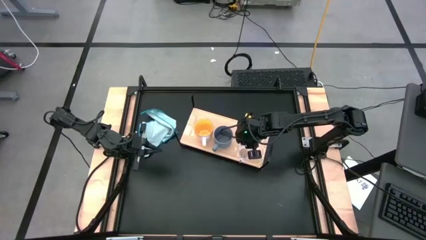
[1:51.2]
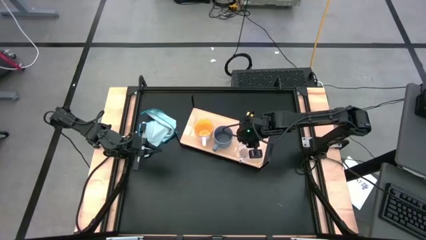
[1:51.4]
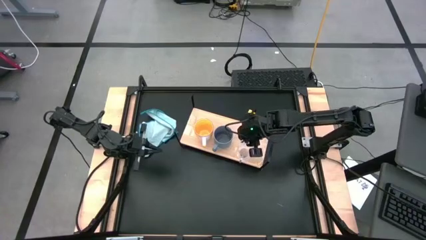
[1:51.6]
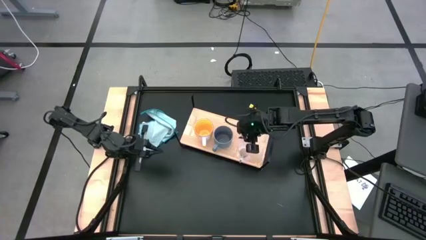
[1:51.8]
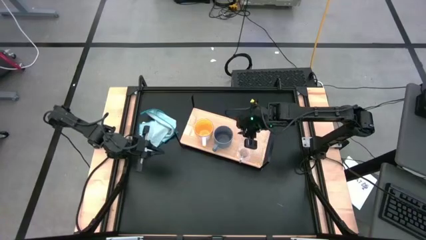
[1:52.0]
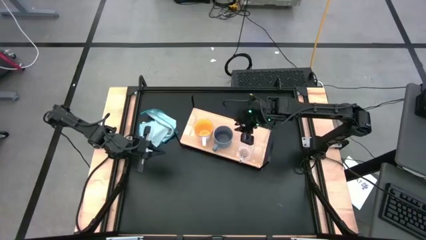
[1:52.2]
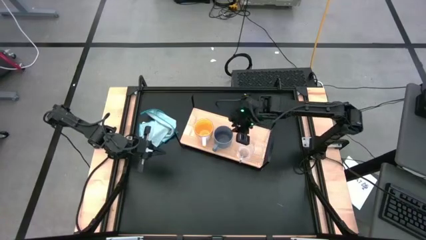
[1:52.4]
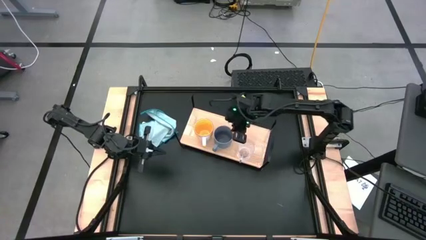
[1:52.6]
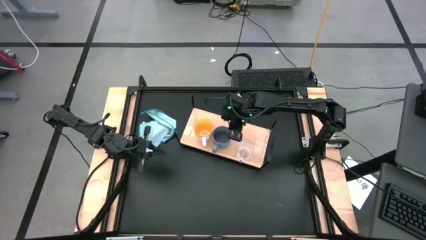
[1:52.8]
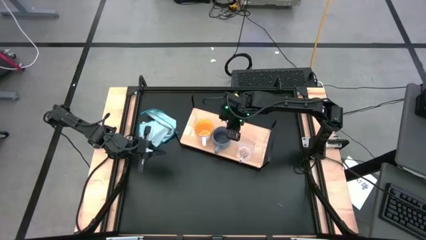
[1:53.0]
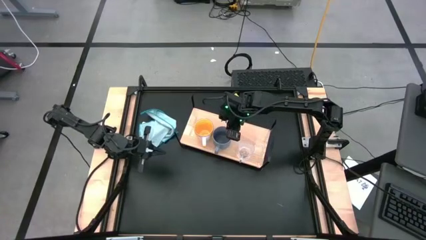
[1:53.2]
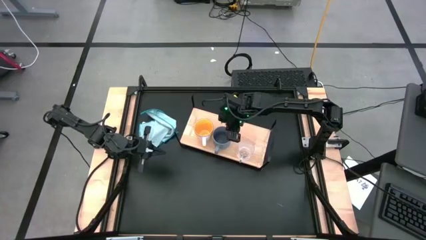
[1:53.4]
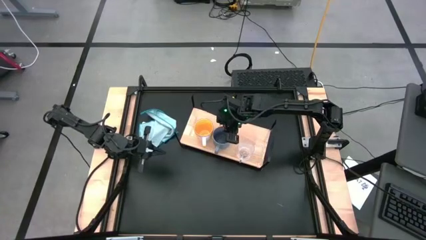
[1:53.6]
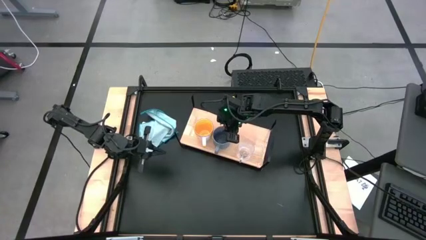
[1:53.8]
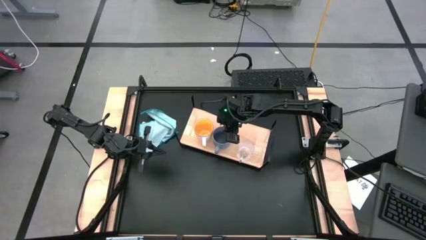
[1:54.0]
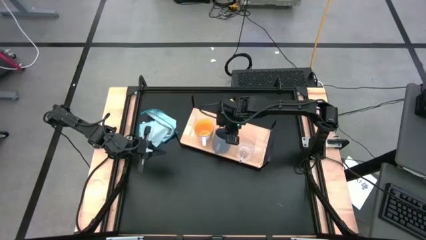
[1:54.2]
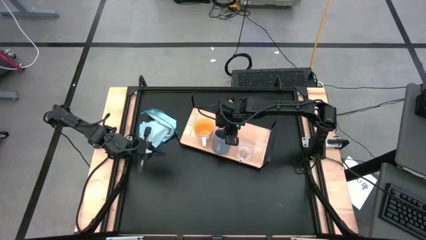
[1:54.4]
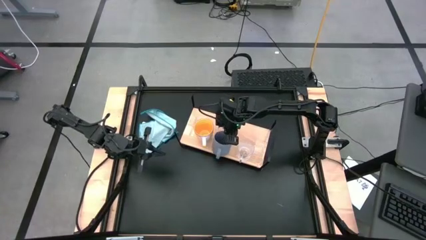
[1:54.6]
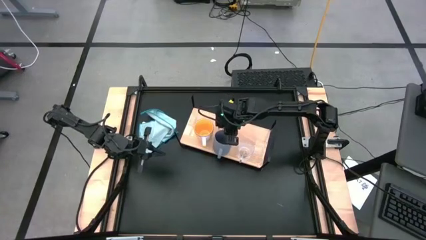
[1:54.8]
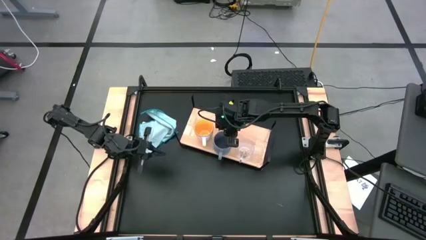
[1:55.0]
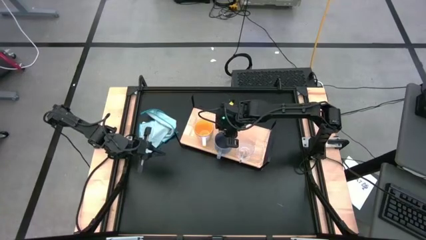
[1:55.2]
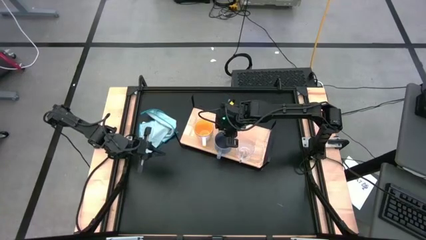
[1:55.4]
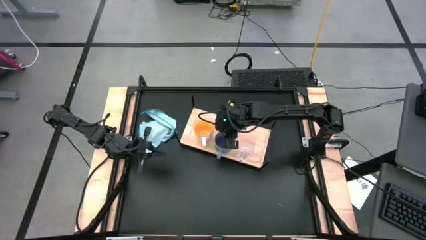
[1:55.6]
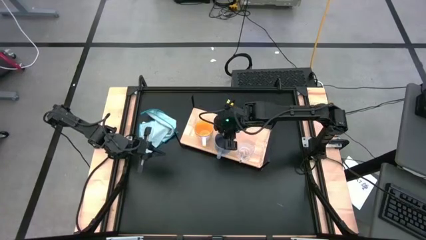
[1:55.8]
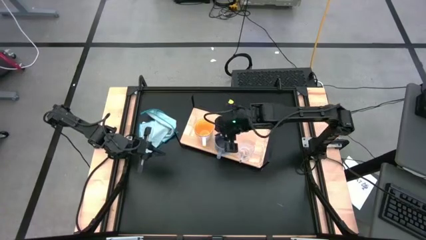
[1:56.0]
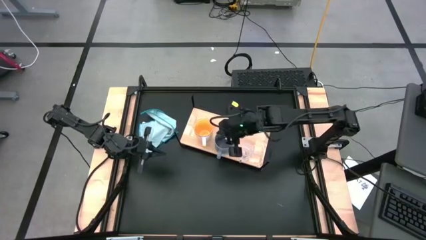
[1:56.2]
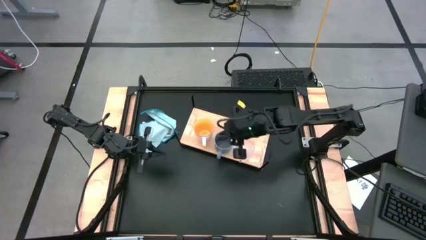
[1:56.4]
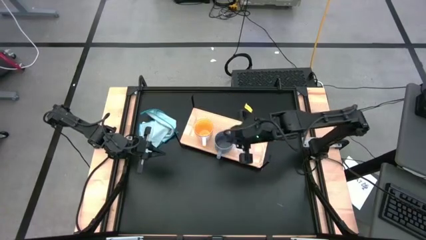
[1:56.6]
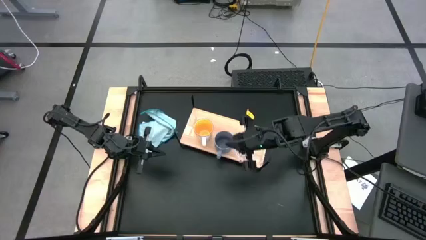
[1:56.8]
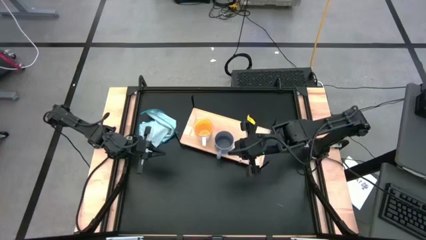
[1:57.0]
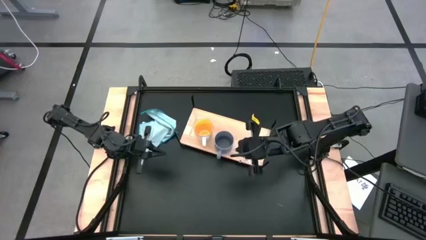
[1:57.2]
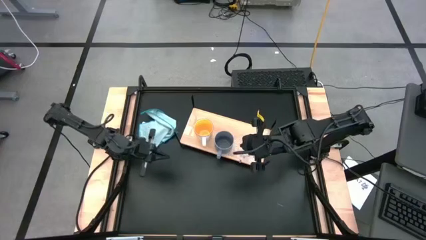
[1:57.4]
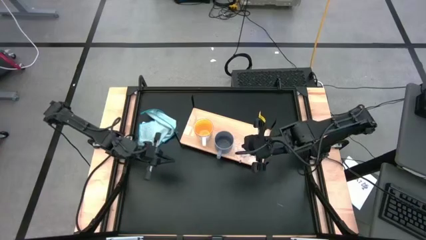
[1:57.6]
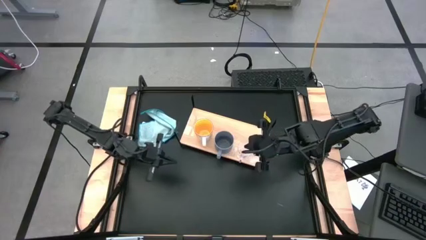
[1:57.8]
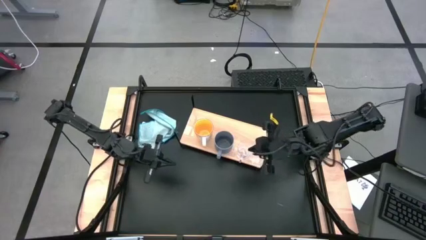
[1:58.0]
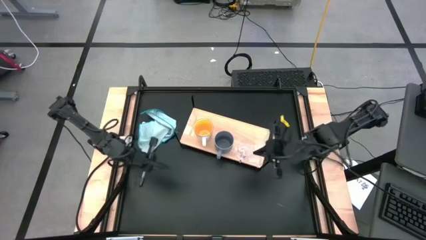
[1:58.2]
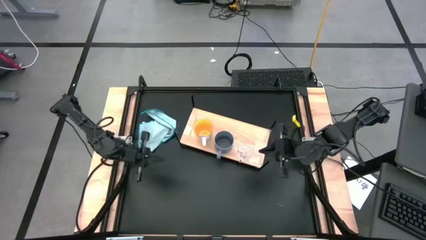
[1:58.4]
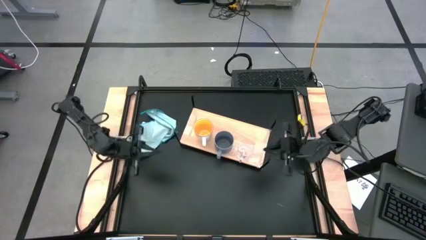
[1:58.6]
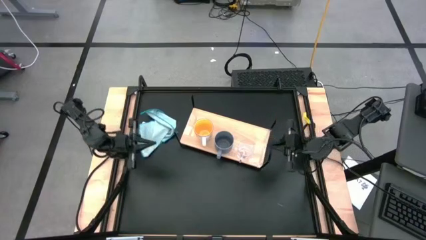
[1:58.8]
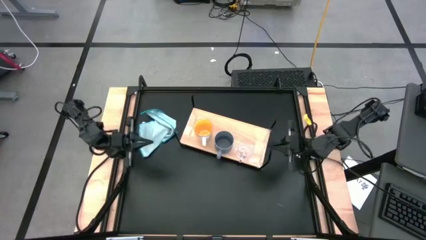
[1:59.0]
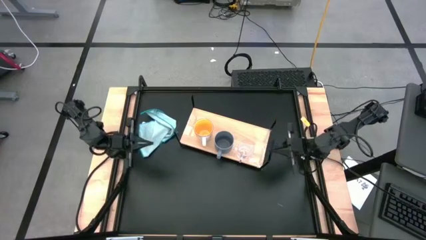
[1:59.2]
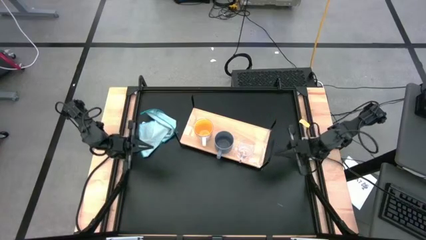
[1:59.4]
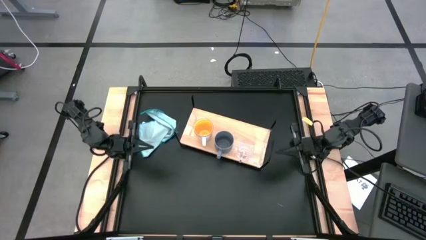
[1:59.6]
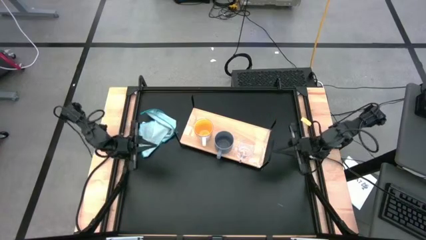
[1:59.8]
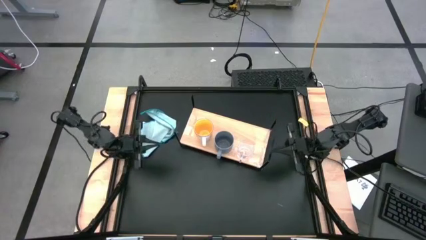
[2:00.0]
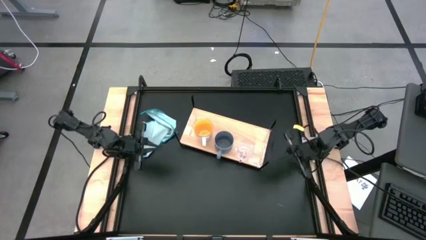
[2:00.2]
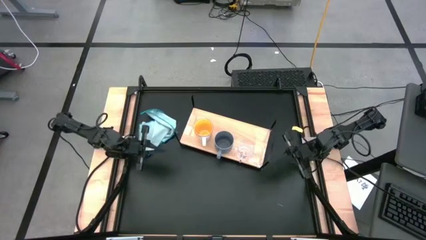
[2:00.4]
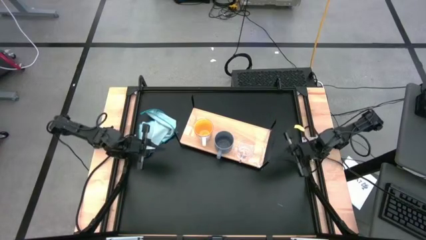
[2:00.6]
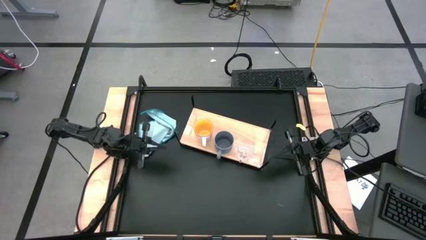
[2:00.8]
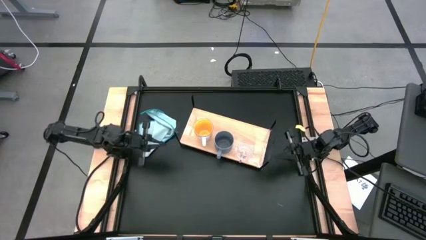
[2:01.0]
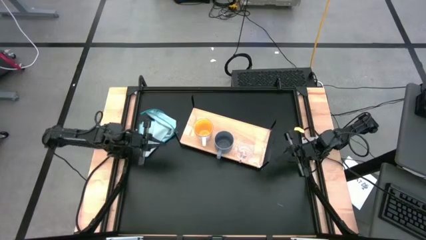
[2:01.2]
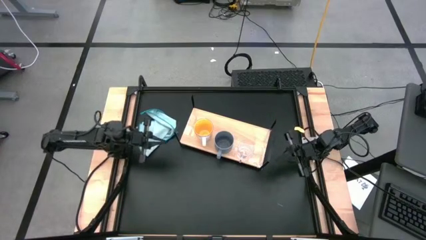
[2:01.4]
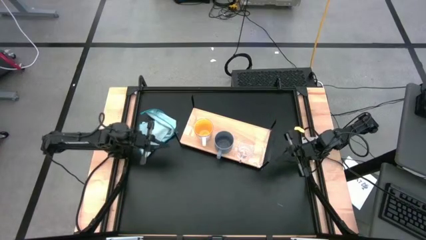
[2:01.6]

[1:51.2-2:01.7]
Task: Stack small to large cups/mugs on shelf
Return to home position

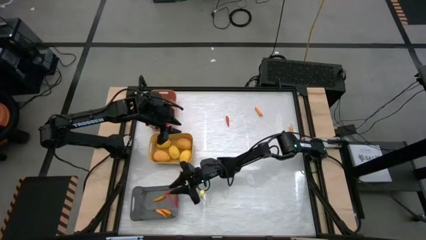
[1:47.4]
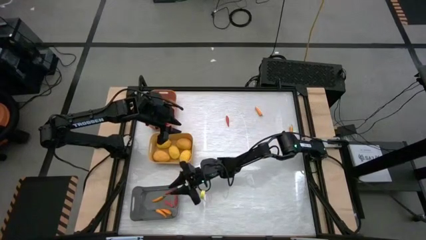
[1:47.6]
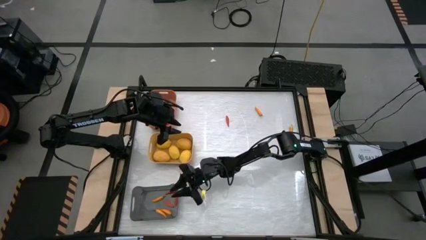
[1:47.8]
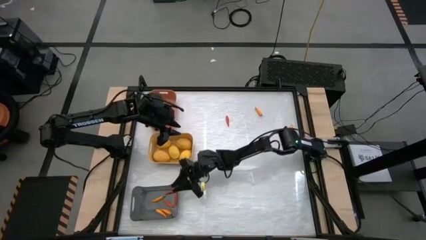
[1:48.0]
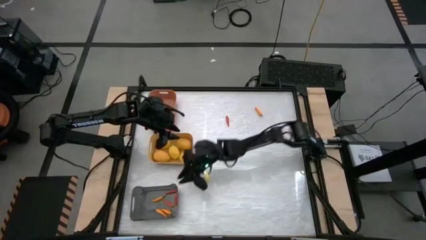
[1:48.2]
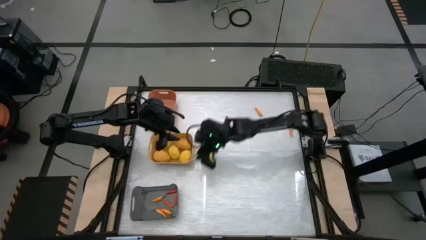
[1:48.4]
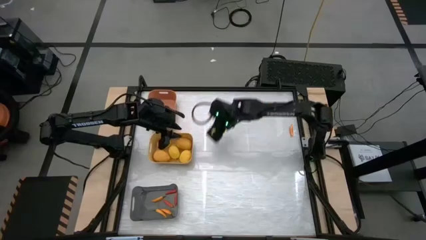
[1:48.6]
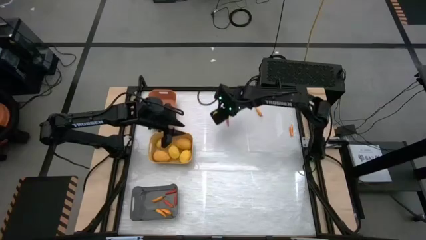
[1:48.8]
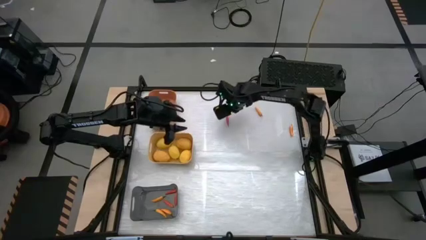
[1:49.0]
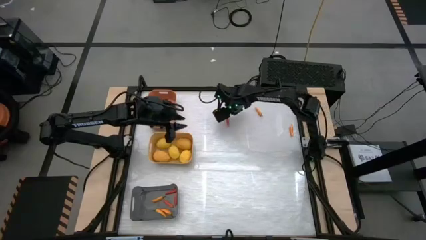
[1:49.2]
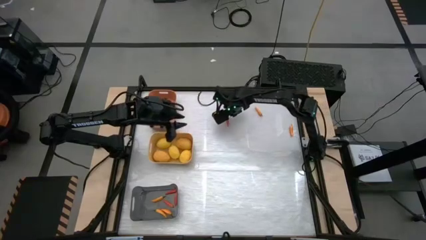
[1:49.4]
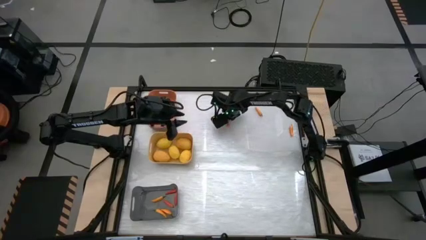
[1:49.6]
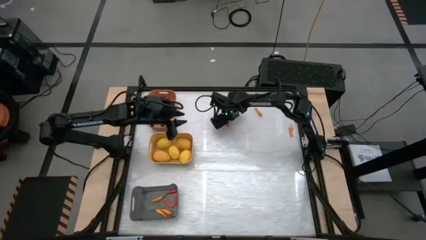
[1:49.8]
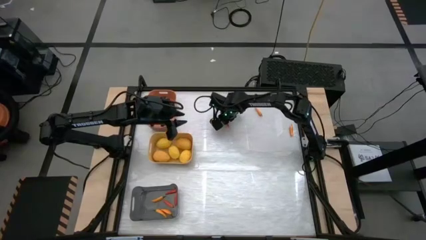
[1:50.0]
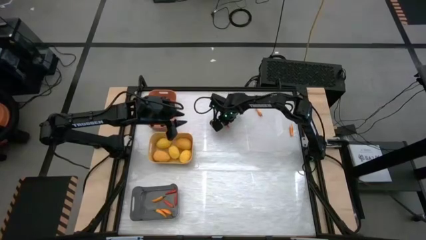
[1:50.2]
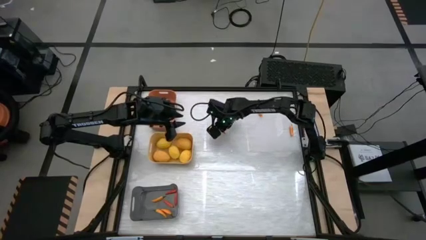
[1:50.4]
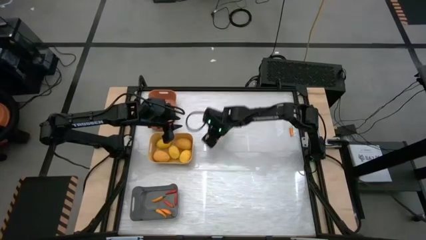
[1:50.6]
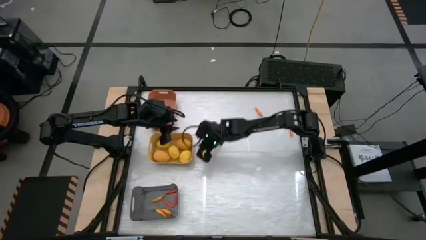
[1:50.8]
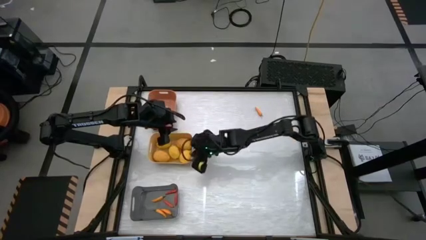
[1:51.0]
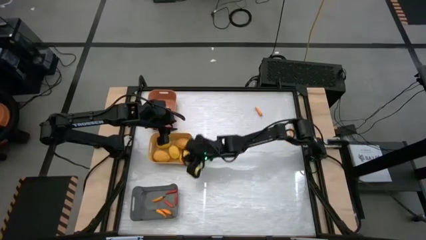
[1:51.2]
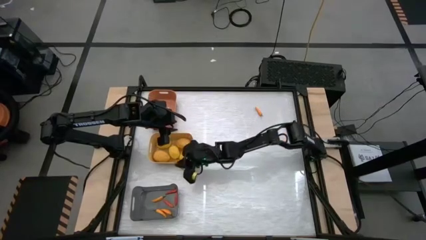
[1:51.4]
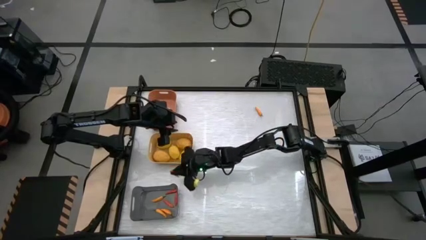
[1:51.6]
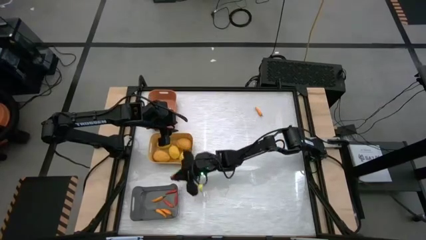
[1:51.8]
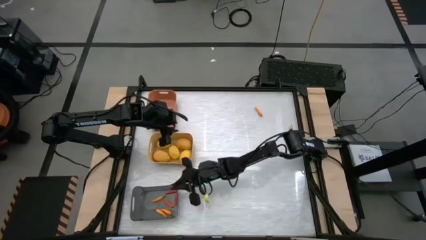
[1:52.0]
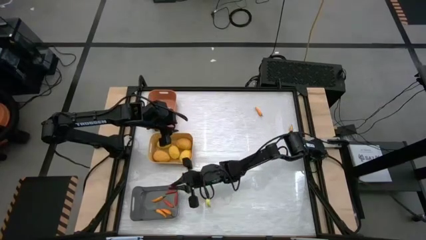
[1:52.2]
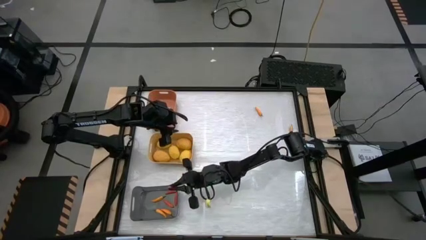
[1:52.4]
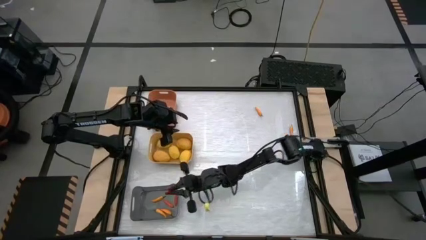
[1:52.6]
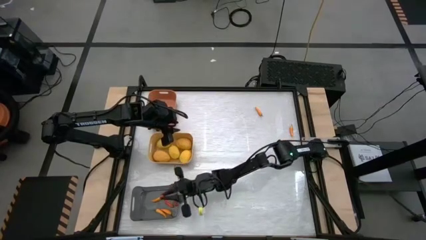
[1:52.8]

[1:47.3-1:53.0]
Task: Sort produce into baskets
Put the red chili pepper into the gray bin
